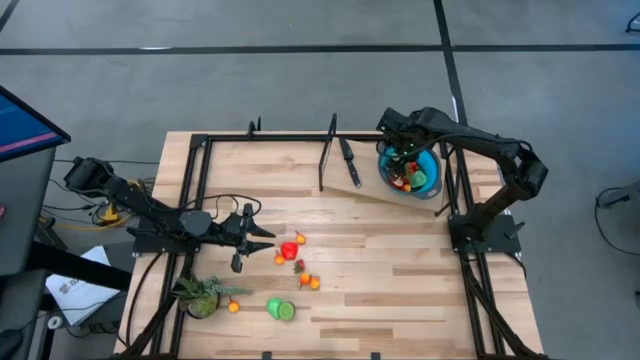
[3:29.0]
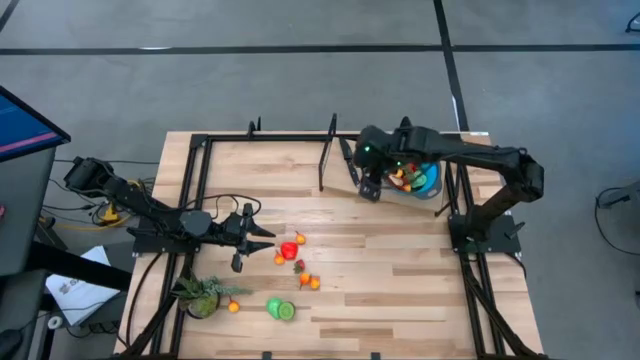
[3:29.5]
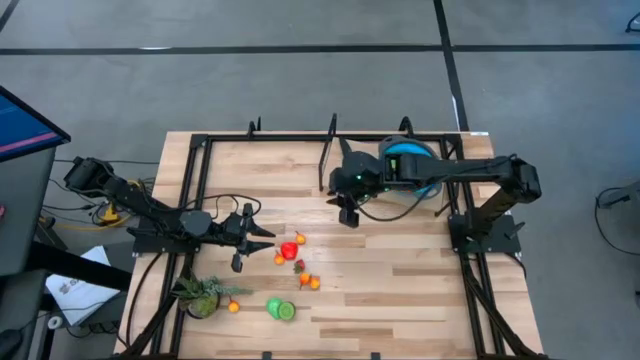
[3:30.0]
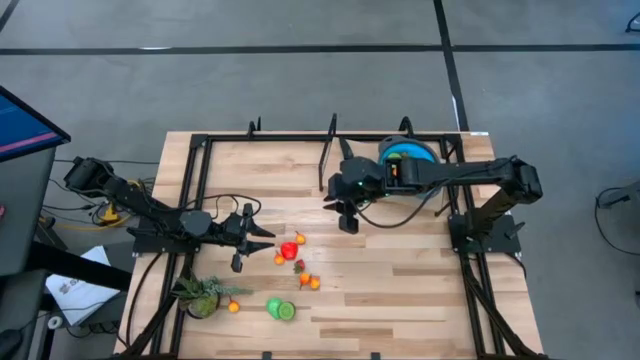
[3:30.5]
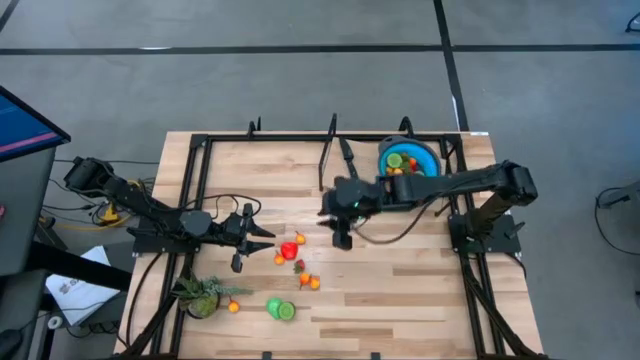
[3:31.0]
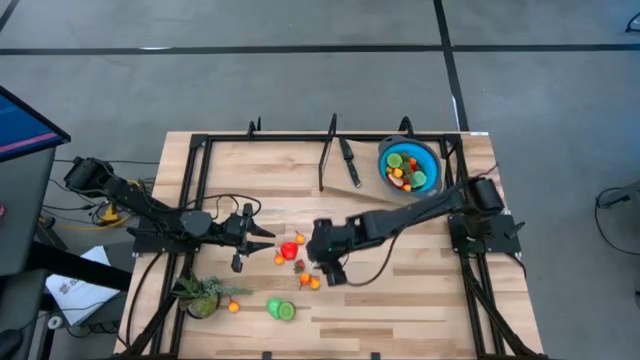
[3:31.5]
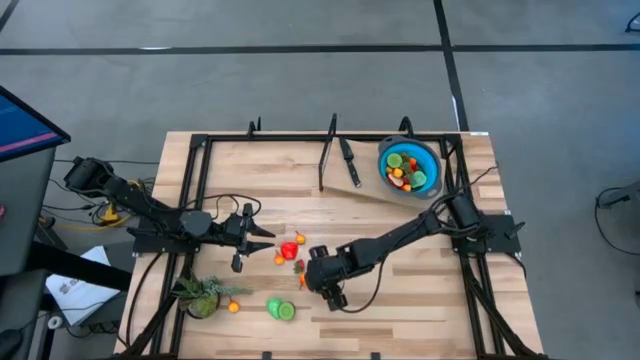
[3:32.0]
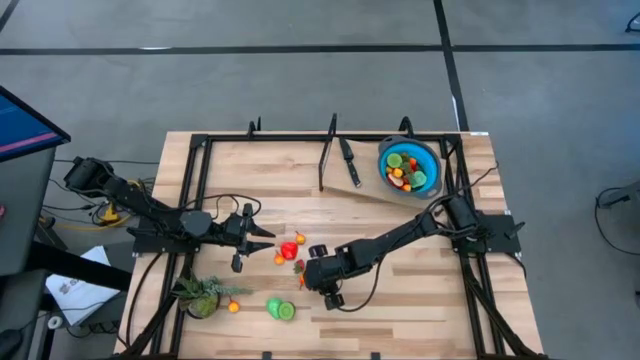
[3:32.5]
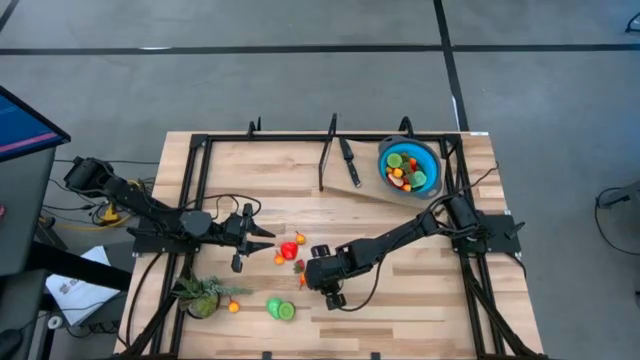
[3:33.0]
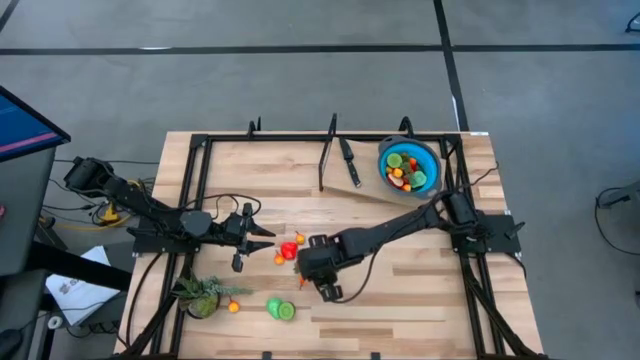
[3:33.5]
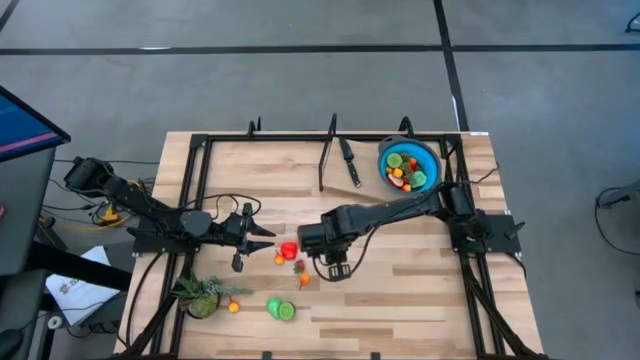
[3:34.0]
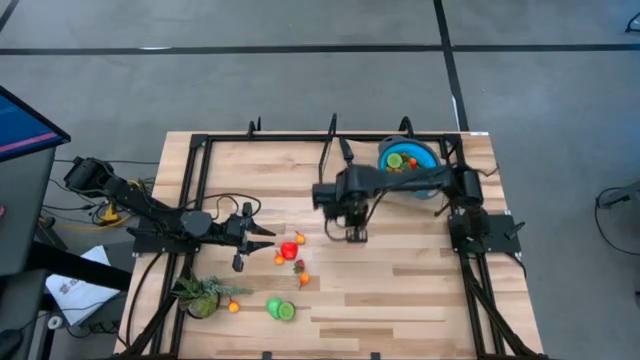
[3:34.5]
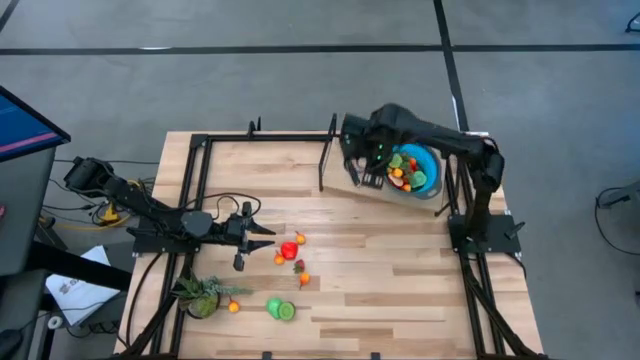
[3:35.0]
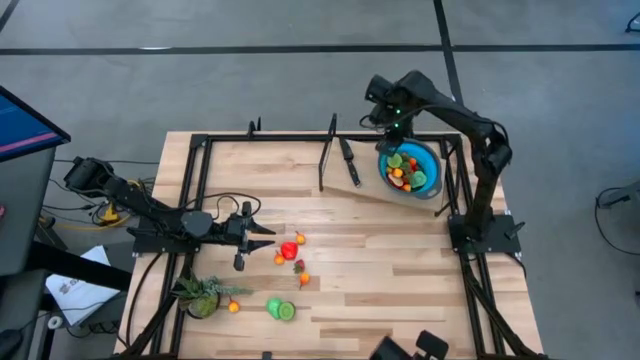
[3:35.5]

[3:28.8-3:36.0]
Task: Pick & Place Fruit
Put the orange pear into the blue colander

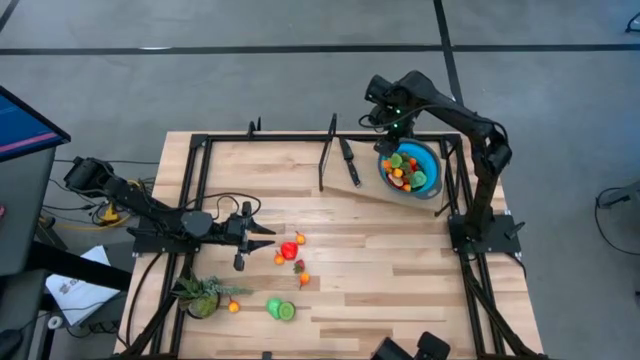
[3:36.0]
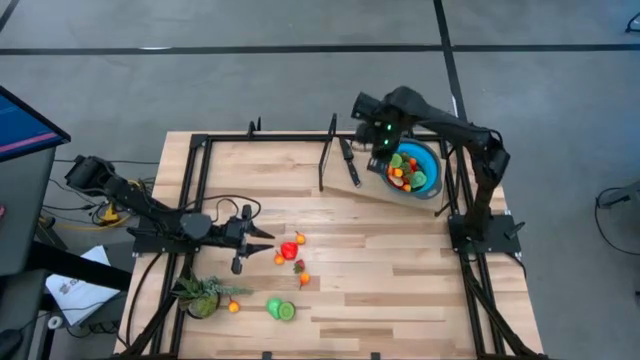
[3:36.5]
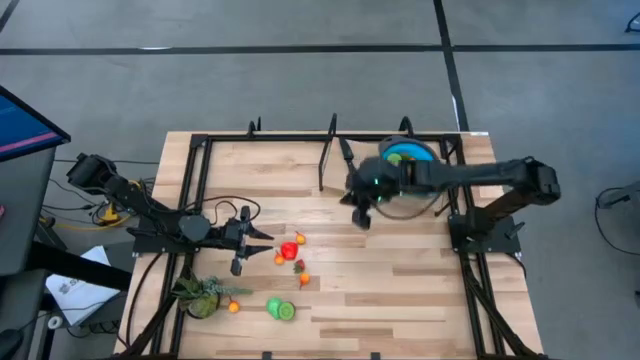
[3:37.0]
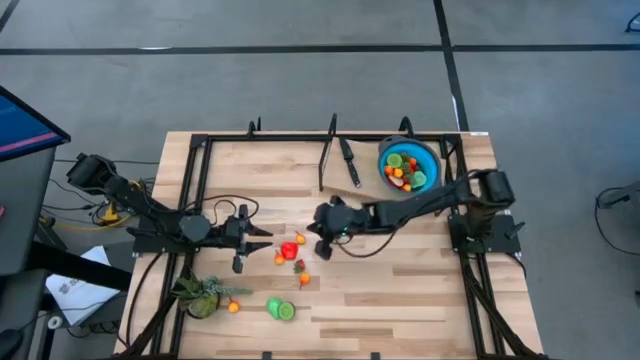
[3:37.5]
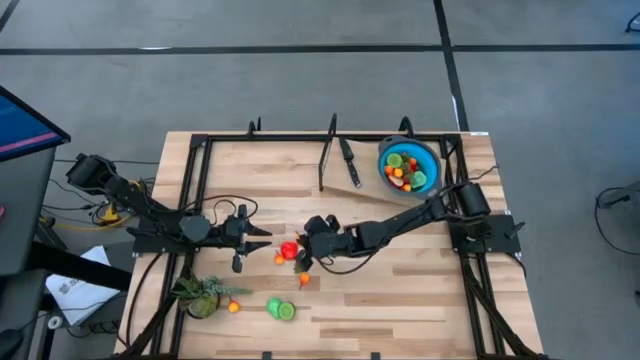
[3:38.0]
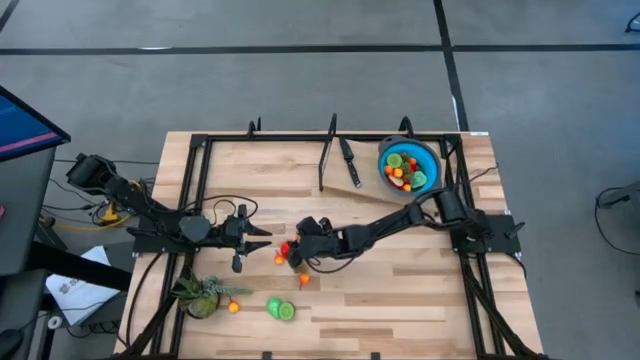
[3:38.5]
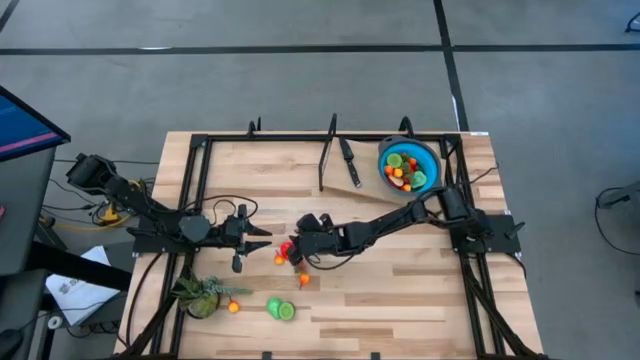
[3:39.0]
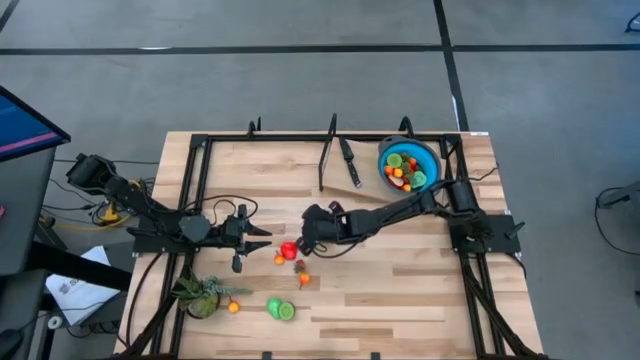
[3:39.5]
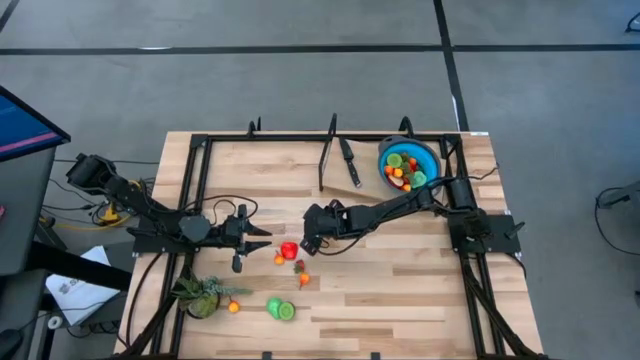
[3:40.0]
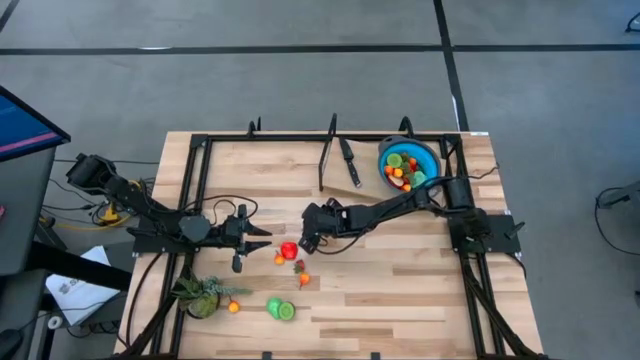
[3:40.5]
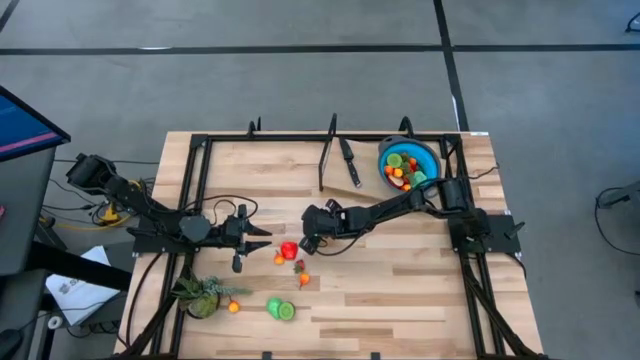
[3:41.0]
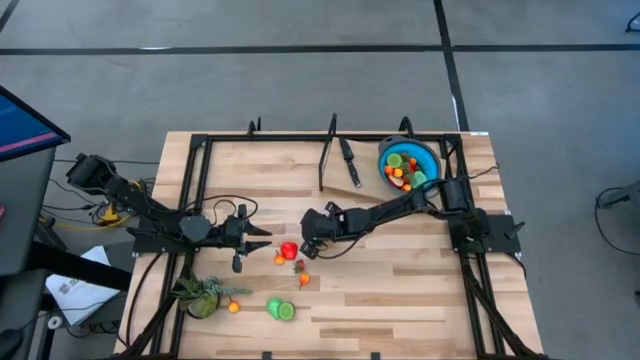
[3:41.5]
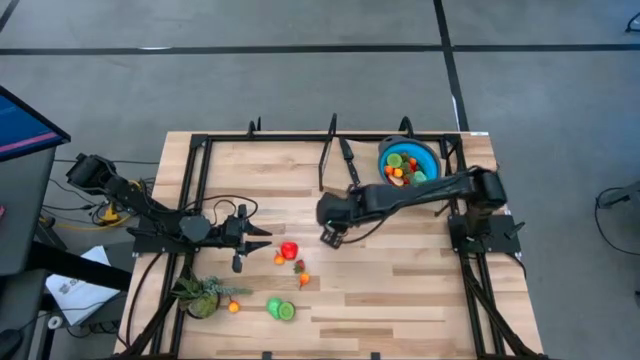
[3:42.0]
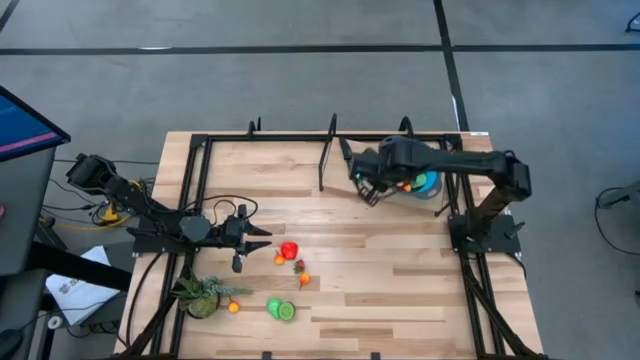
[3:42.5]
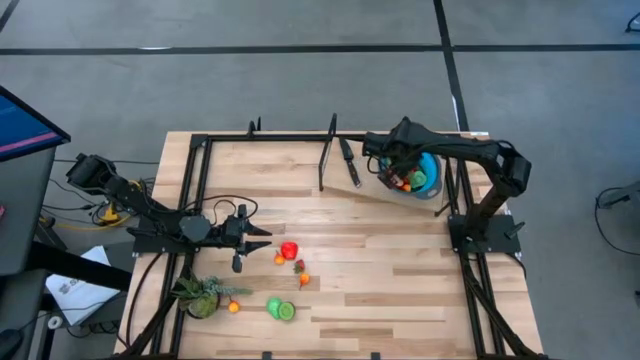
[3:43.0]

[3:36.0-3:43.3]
Put the orange pear into the blue colander

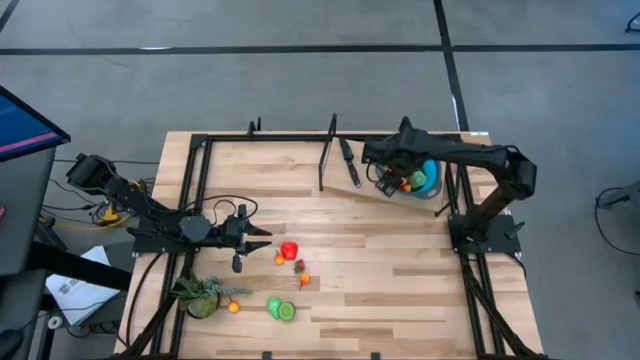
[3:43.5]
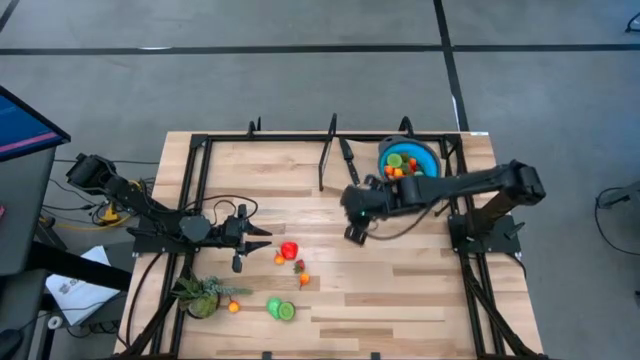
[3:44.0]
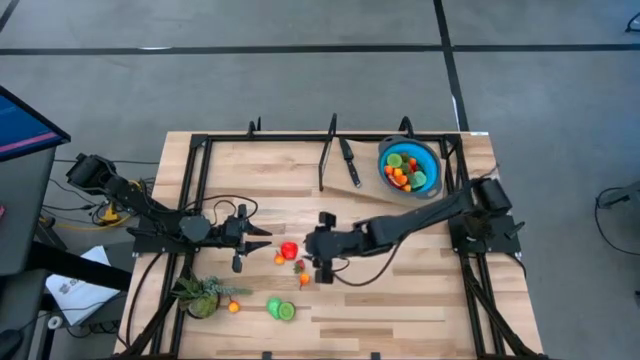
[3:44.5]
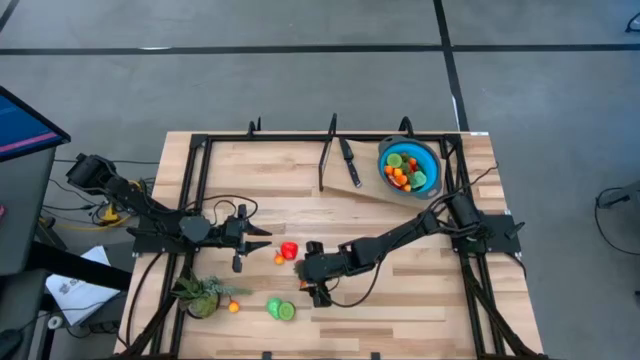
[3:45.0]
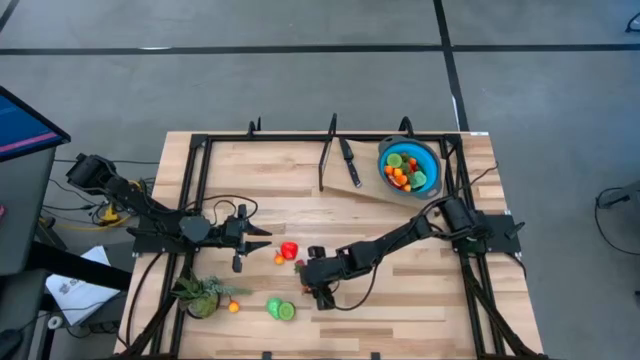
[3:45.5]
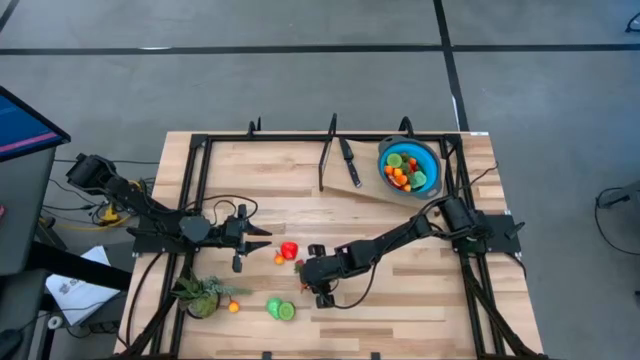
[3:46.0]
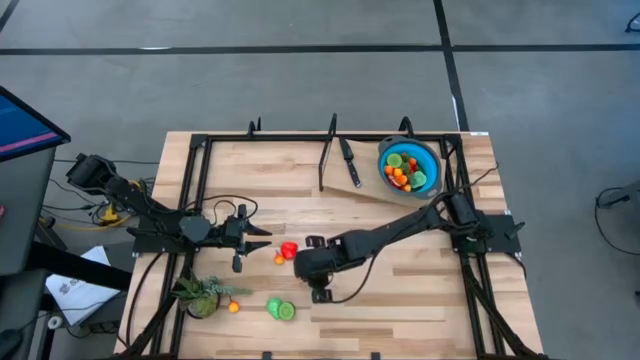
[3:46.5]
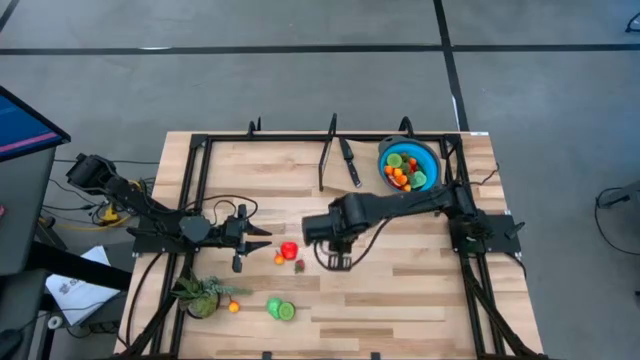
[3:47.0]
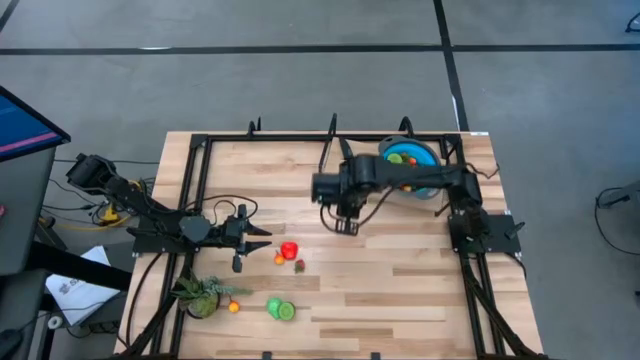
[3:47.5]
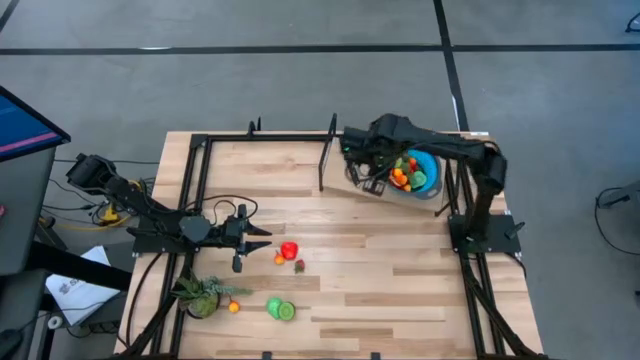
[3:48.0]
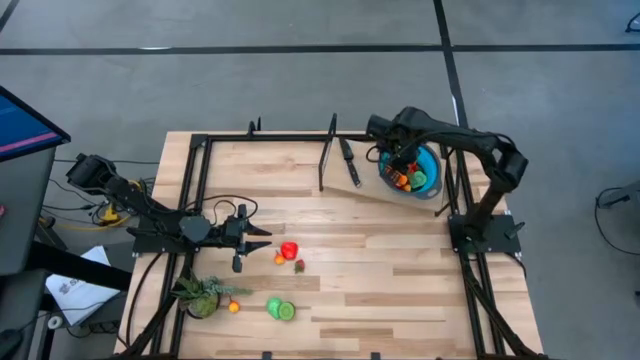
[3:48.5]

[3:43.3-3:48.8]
Put the orange pear into the blue colander

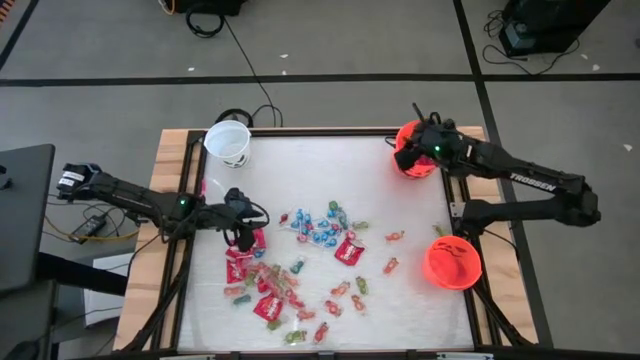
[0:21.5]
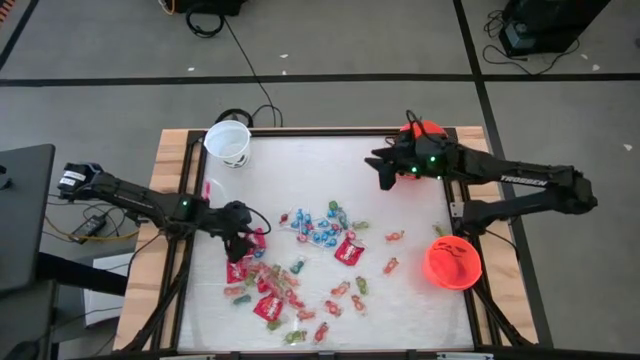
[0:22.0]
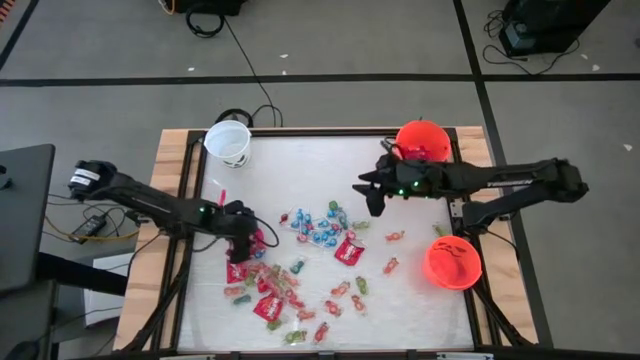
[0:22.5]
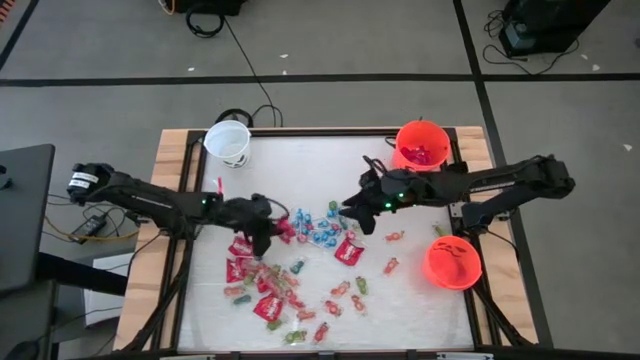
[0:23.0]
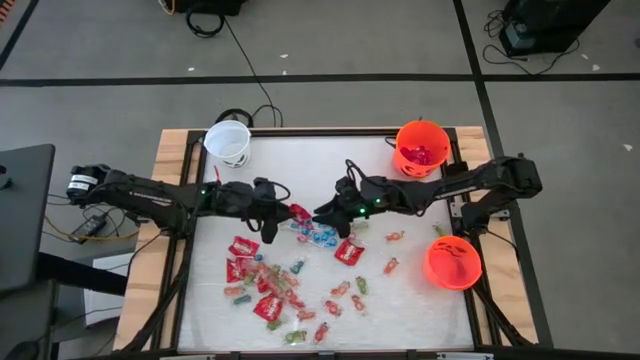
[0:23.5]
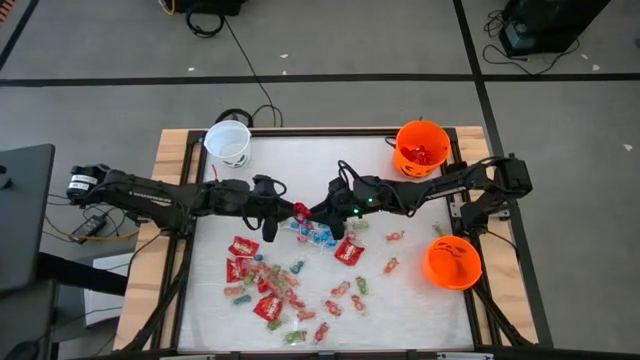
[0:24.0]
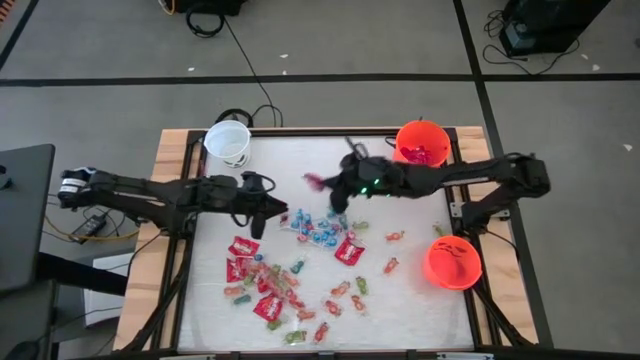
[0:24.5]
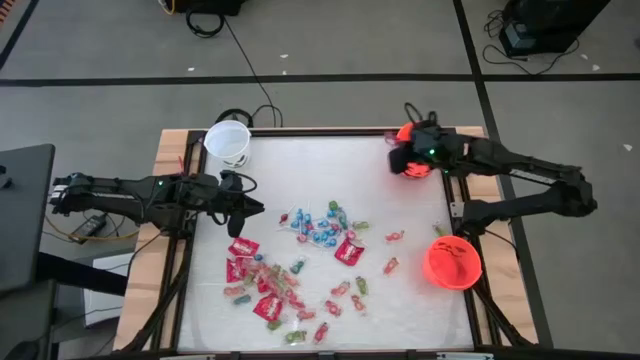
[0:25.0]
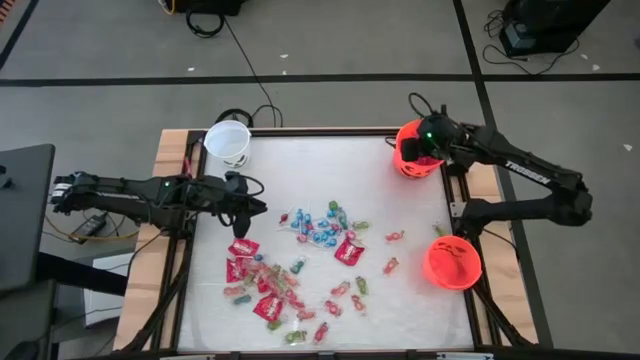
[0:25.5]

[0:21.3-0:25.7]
Task: Sort candy by brand, put in halloween buckets
Put the red candy into the top orange bucket
